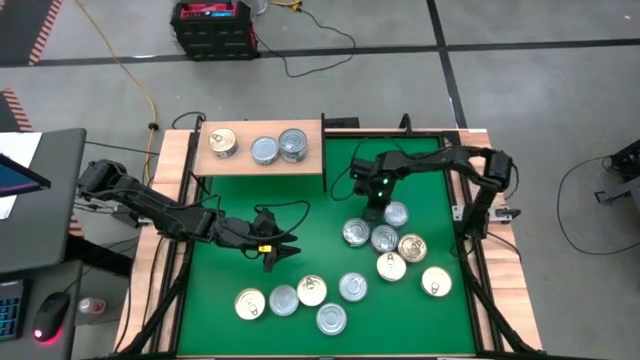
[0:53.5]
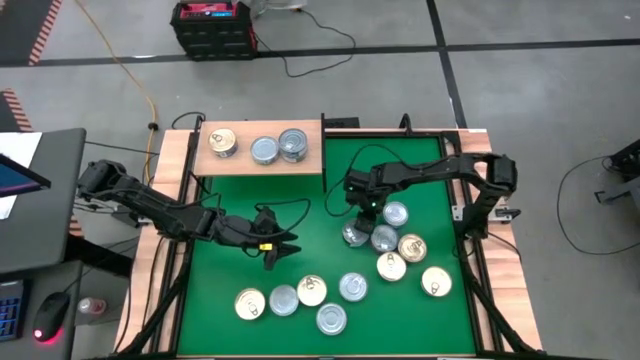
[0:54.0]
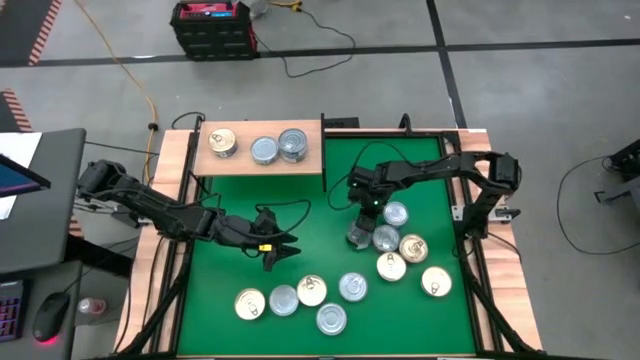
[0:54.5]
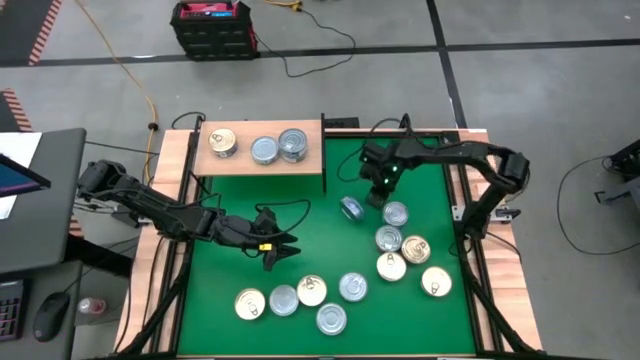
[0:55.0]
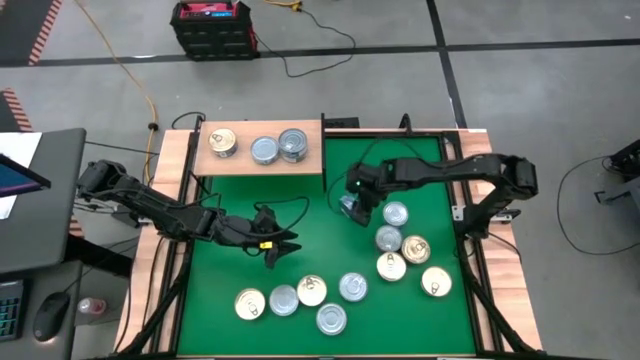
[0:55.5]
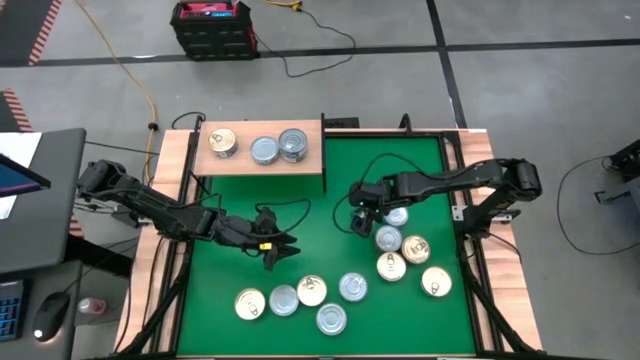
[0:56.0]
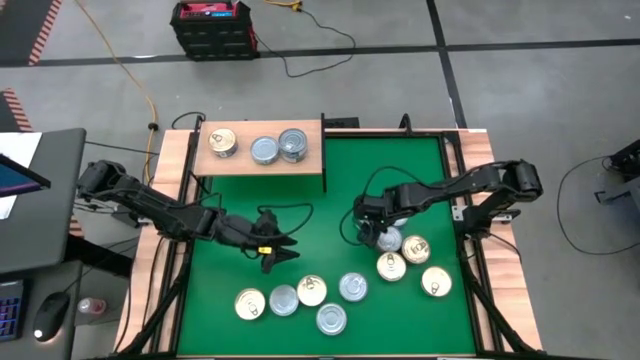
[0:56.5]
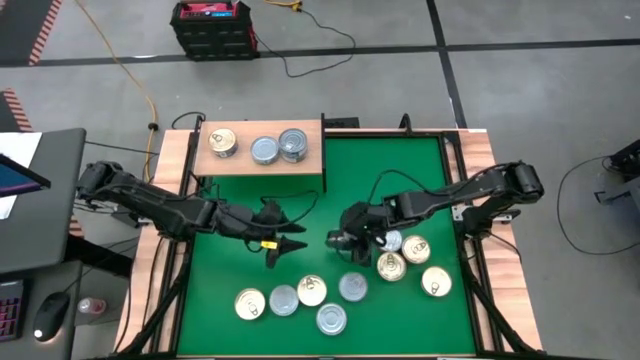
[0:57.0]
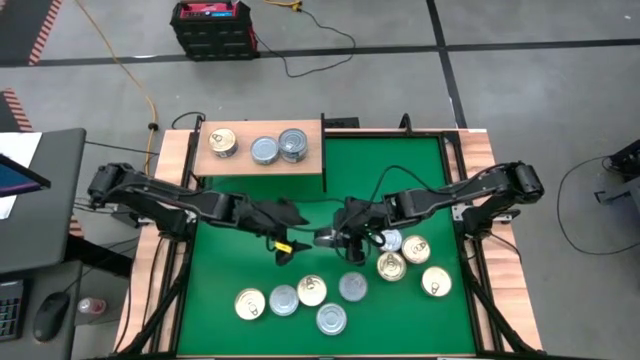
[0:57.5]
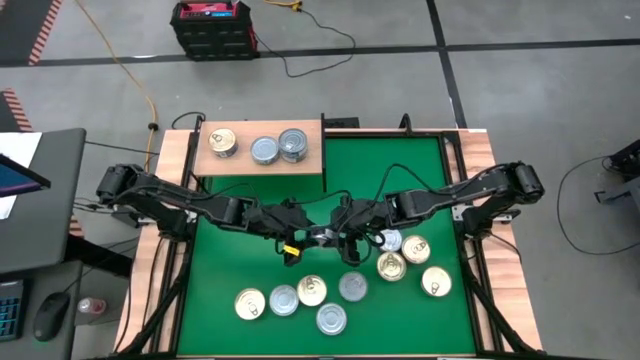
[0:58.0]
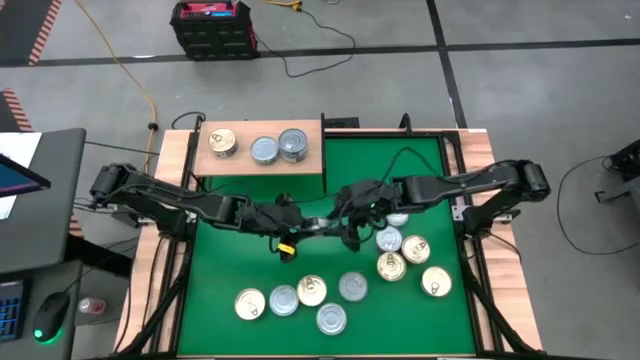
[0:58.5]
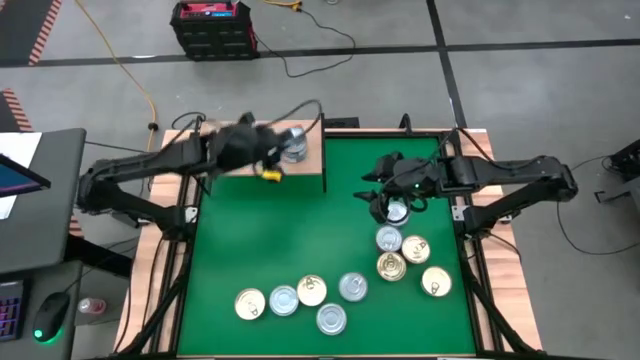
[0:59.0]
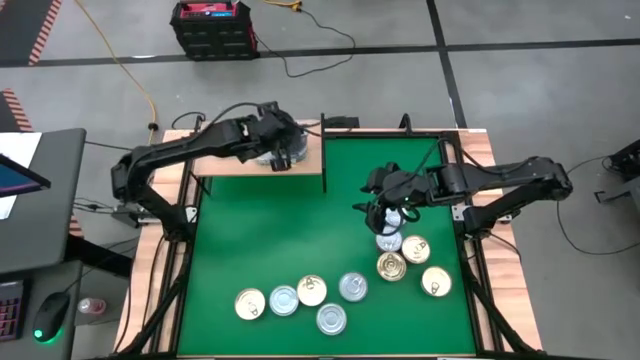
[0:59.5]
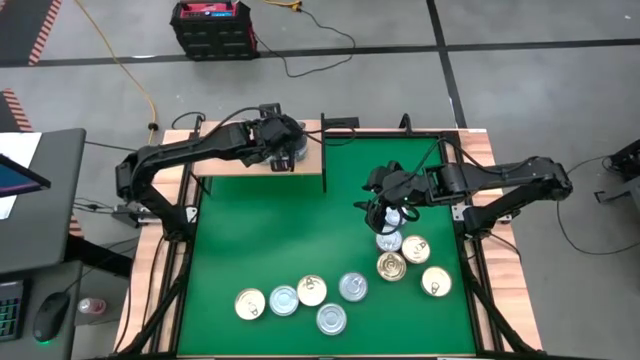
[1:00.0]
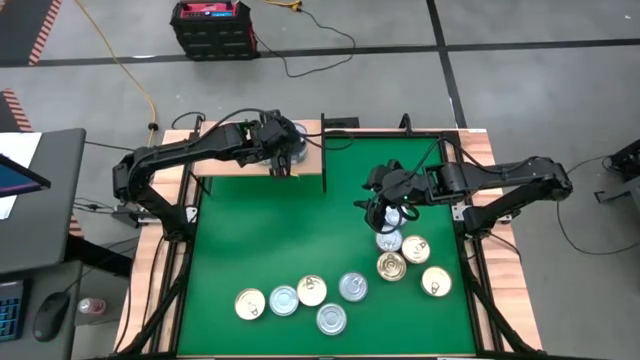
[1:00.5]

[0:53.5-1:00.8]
Task: Stack canned seafood by type on shelf
Stack the dark blue tuna can on top of the dark blue tuna can on the shelf

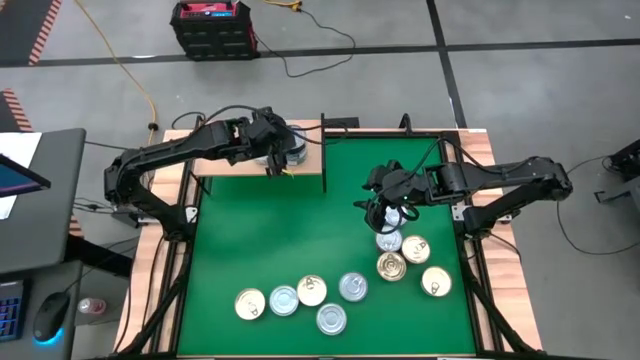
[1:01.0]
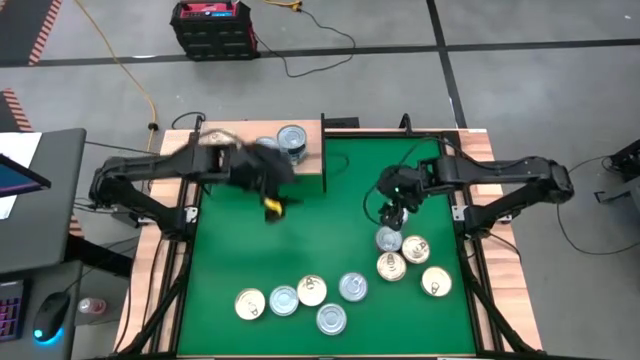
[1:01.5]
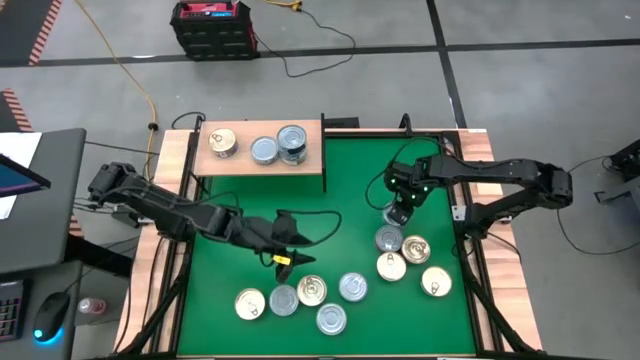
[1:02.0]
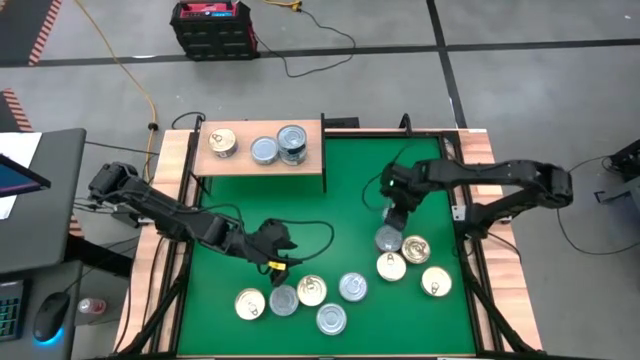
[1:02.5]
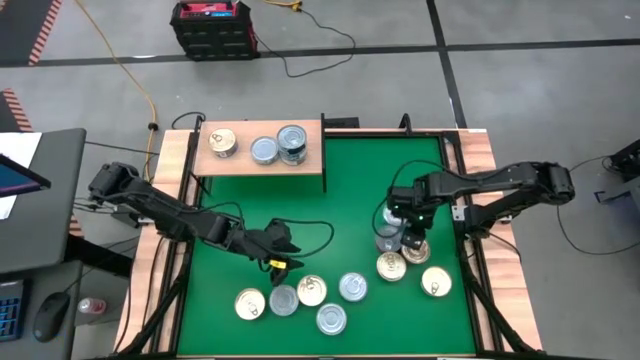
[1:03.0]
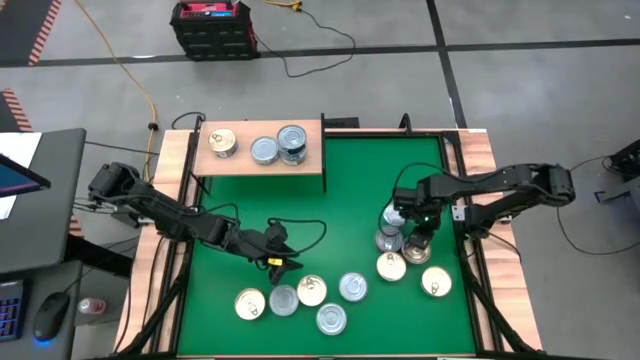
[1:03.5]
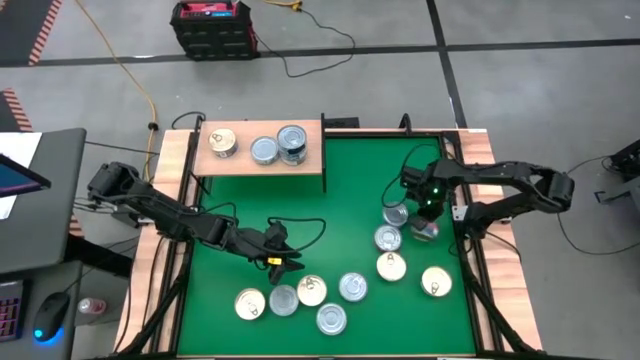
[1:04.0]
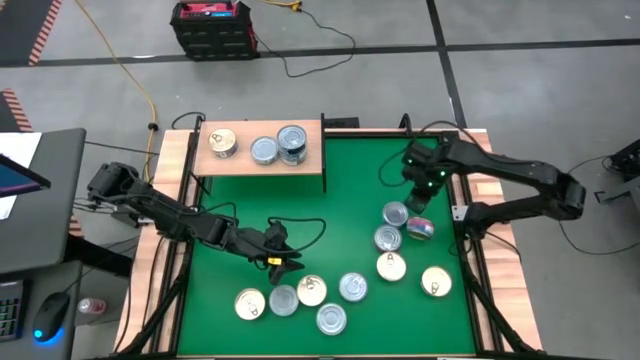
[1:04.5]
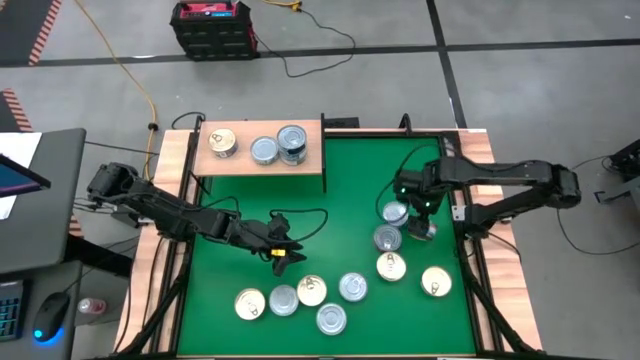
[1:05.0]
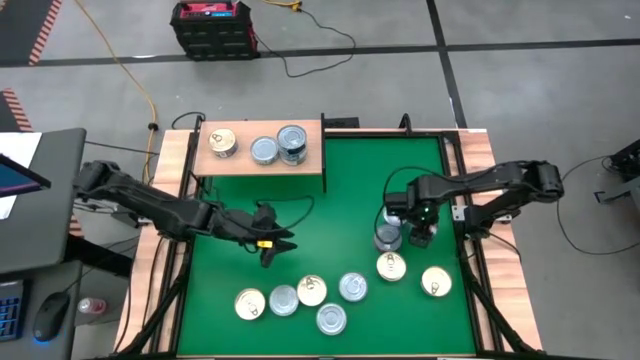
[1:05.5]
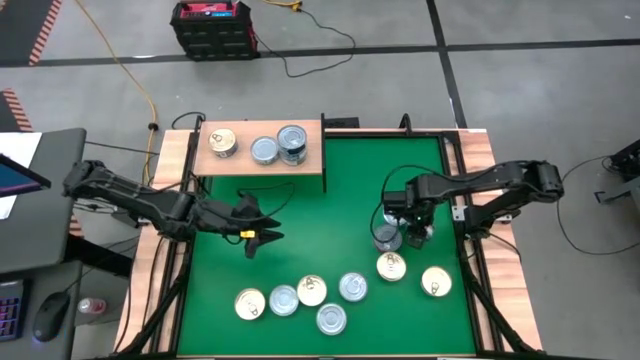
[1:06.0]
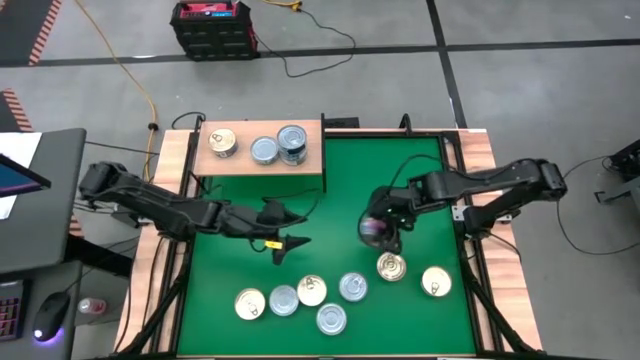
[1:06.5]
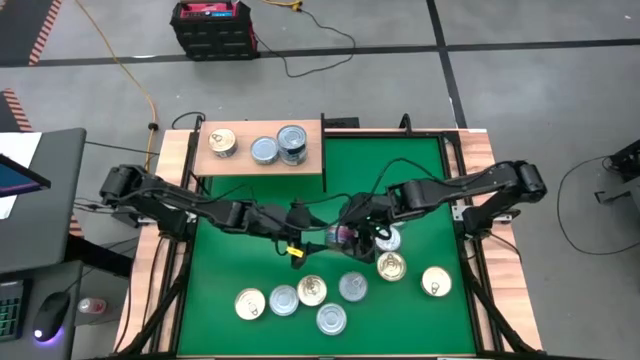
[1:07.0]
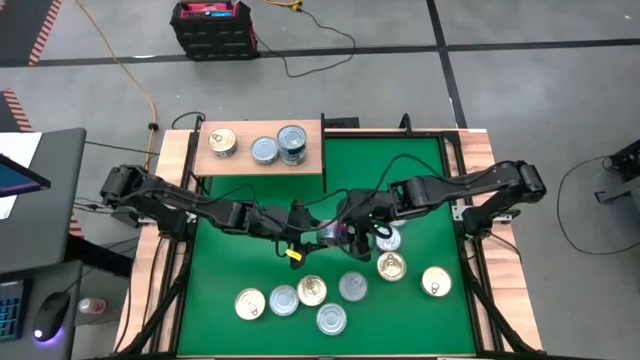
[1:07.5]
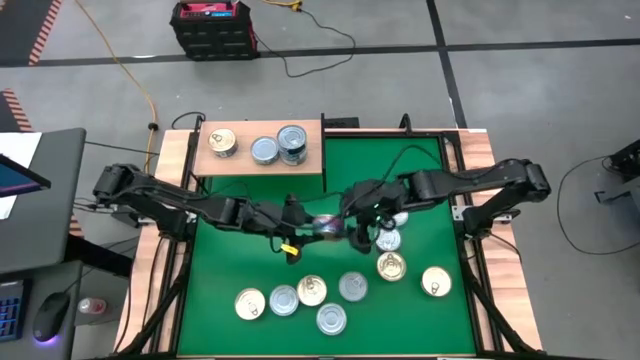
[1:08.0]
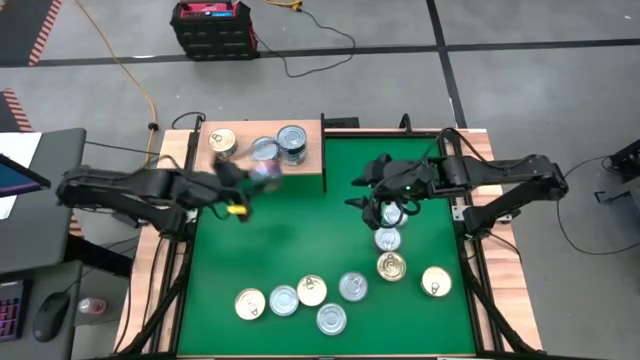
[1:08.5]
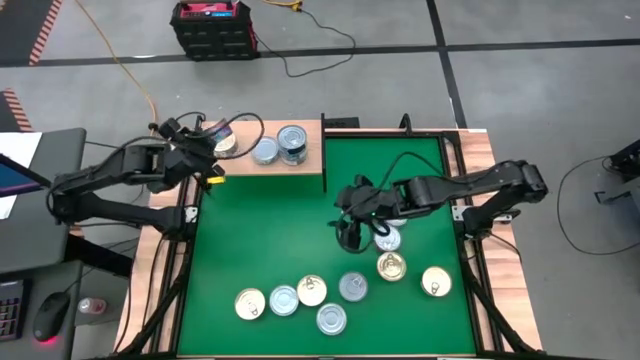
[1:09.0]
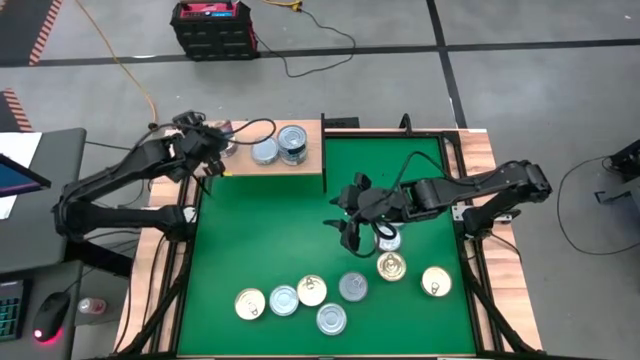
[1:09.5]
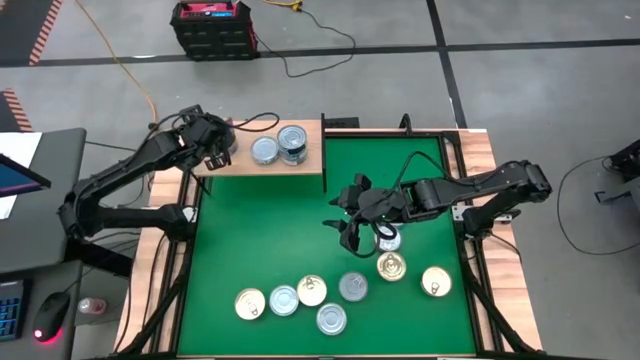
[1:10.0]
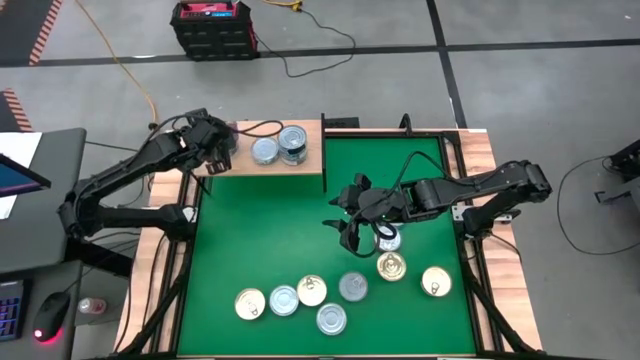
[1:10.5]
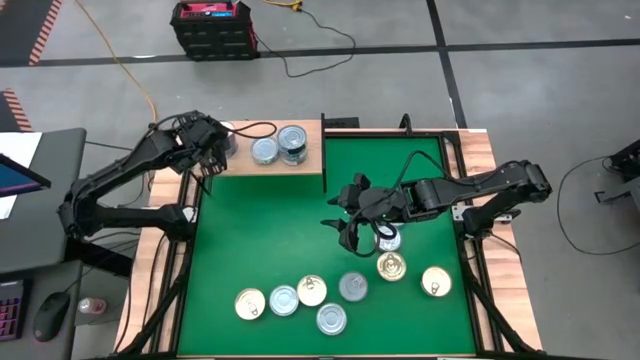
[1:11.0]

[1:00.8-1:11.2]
Stack the blue and pink tuna can on top of the blue and pink tuna cans on the shelf

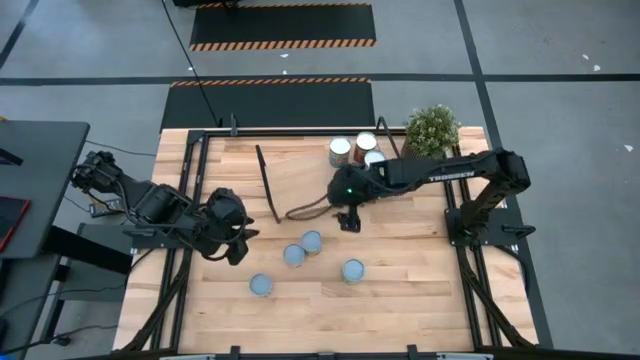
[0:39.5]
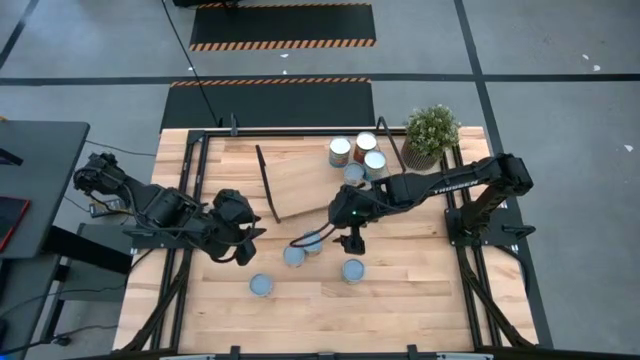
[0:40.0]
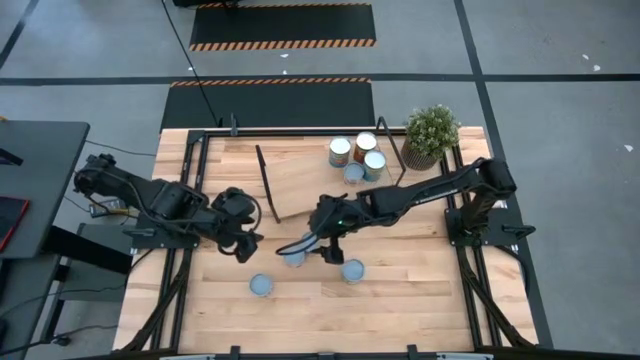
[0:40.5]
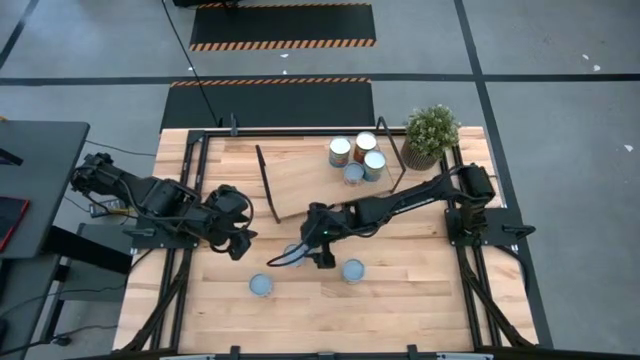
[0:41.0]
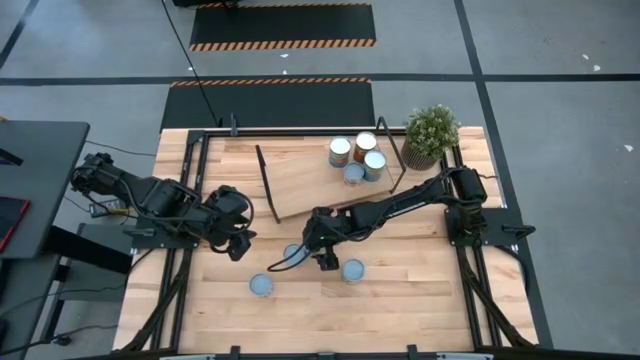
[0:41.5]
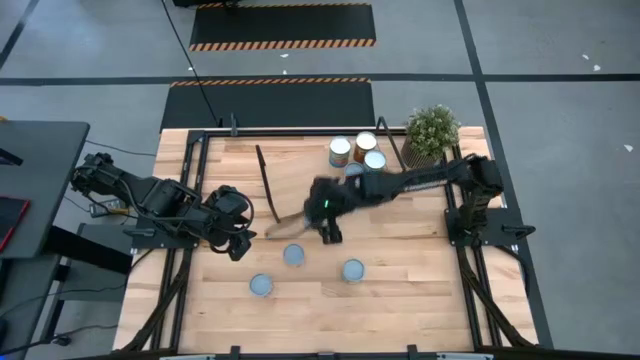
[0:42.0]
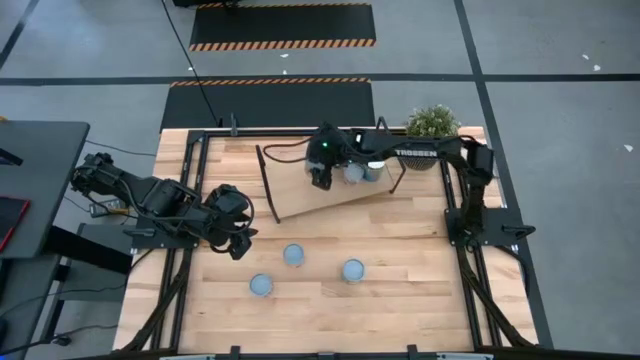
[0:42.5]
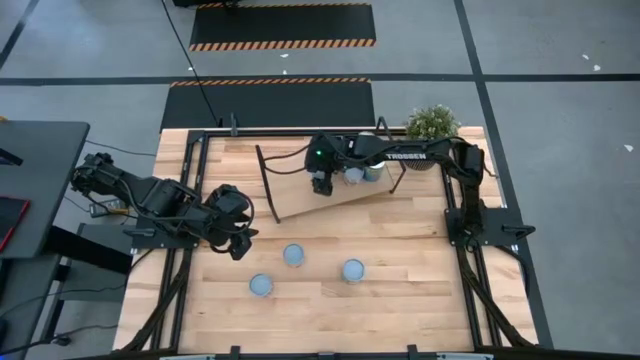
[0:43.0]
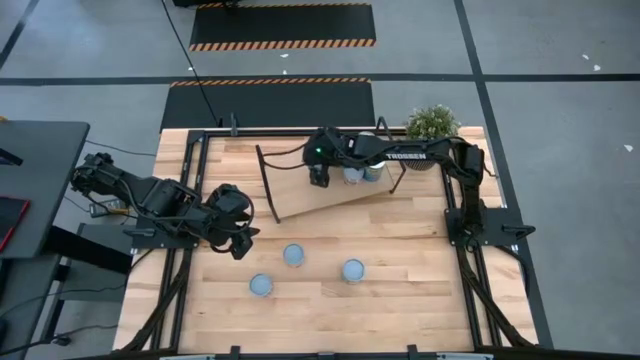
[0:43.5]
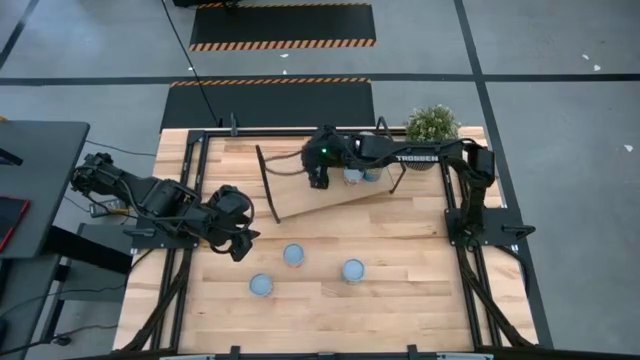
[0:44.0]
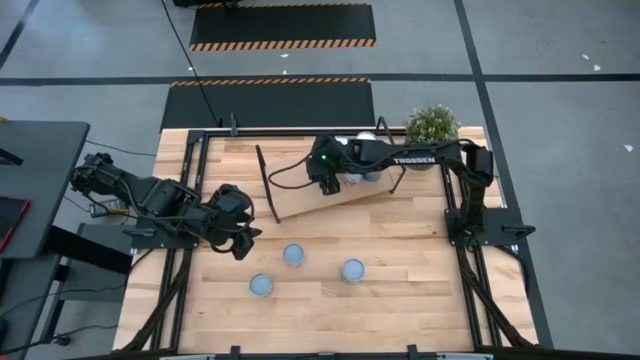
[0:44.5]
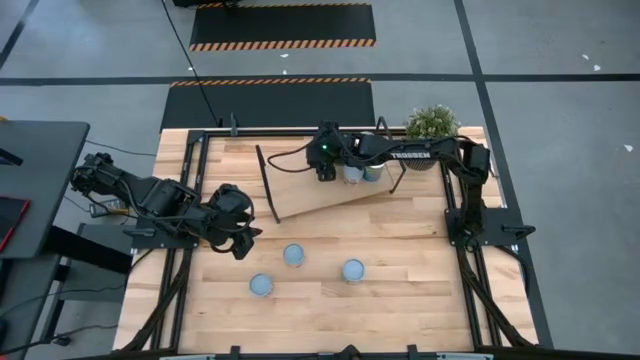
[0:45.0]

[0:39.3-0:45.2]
Task: Pick and place cans onto a shelf
Put the canned meatballs on the shelf
